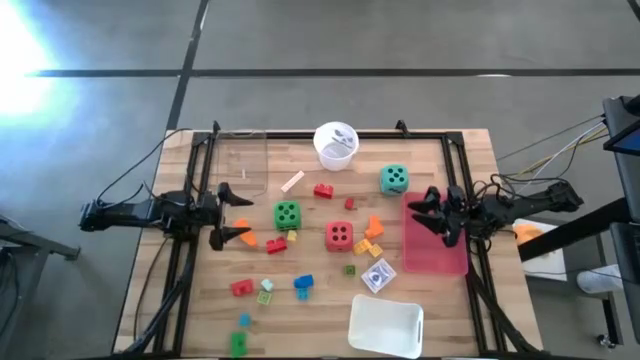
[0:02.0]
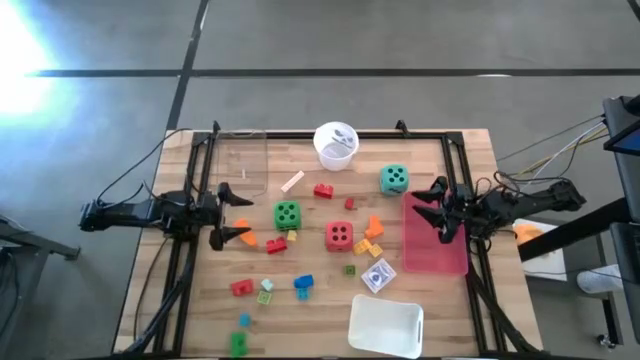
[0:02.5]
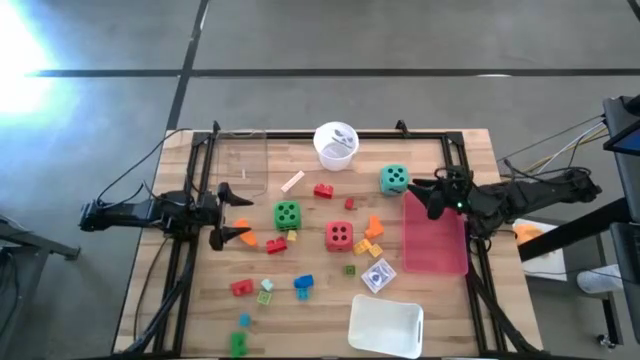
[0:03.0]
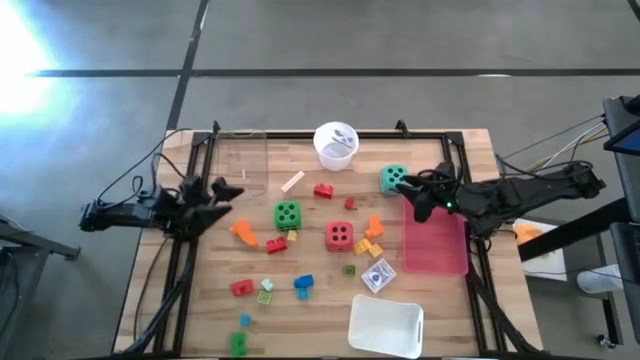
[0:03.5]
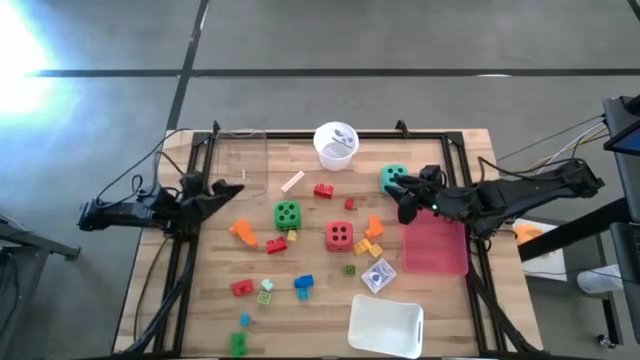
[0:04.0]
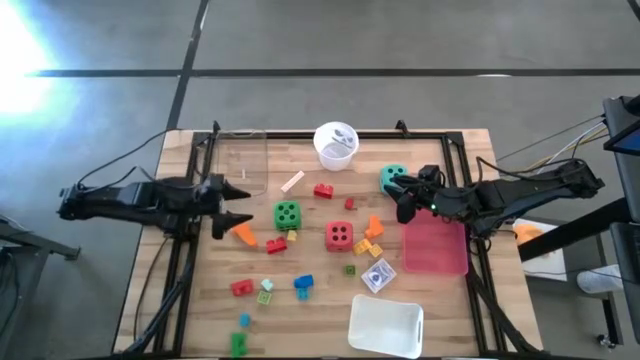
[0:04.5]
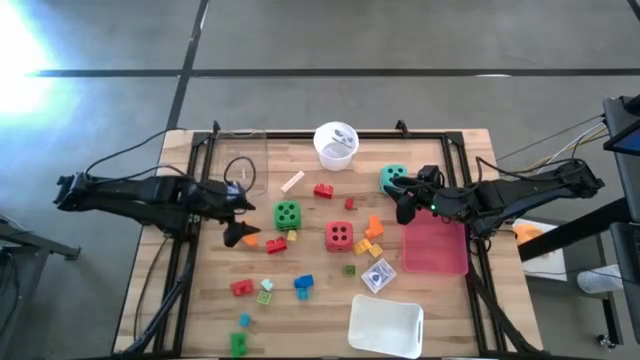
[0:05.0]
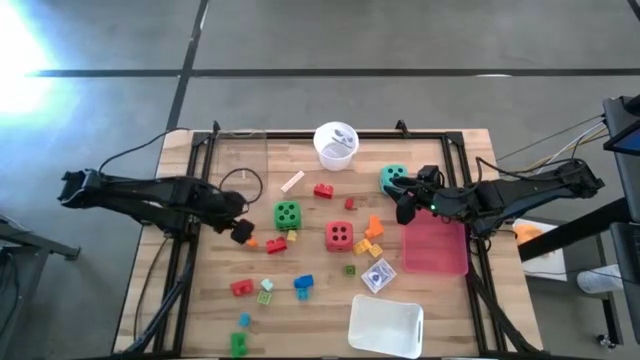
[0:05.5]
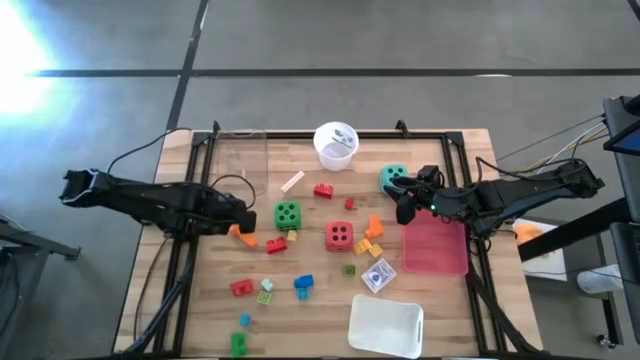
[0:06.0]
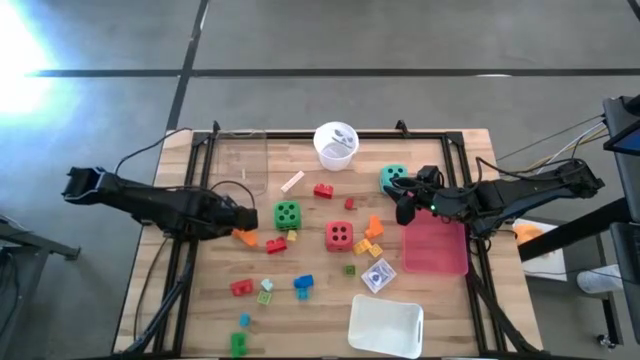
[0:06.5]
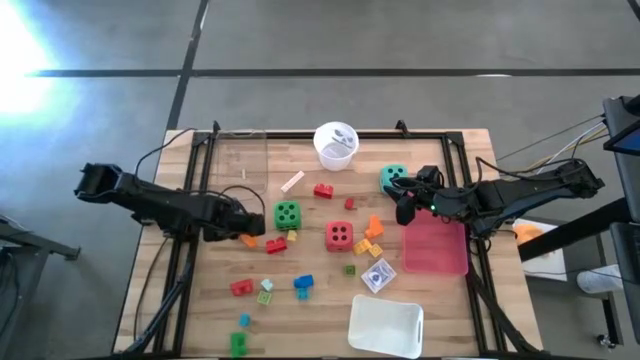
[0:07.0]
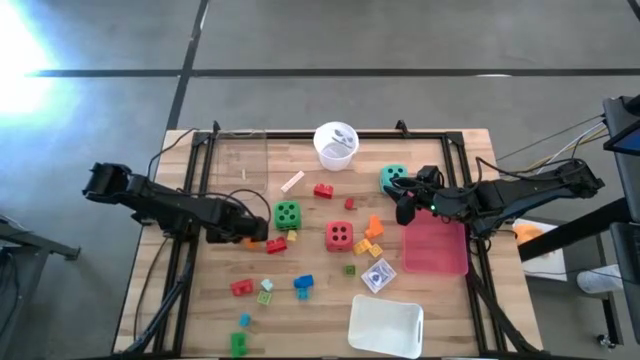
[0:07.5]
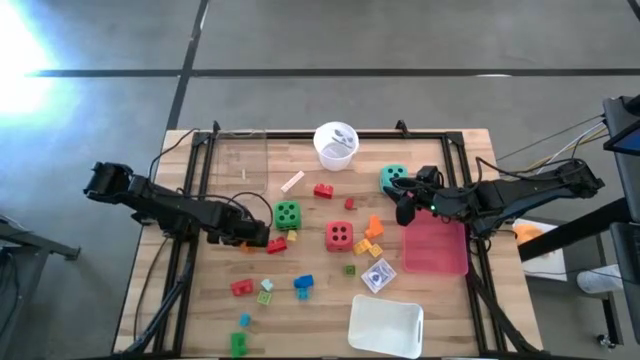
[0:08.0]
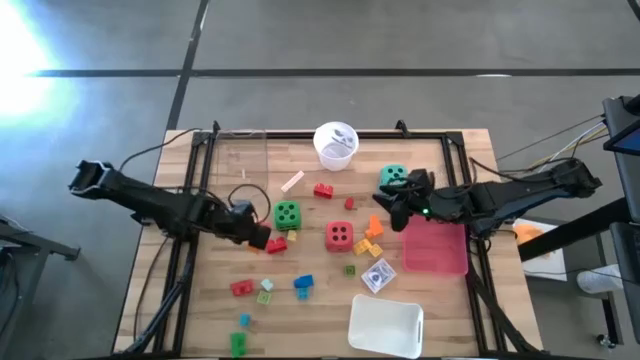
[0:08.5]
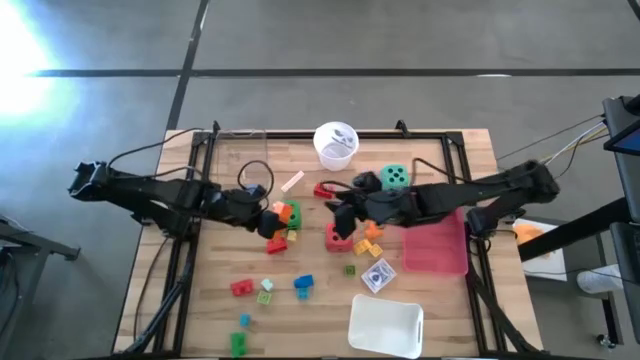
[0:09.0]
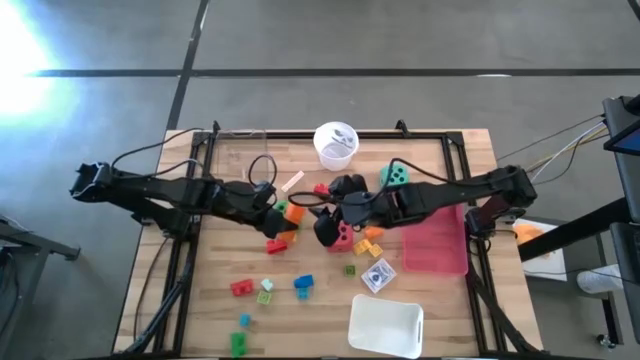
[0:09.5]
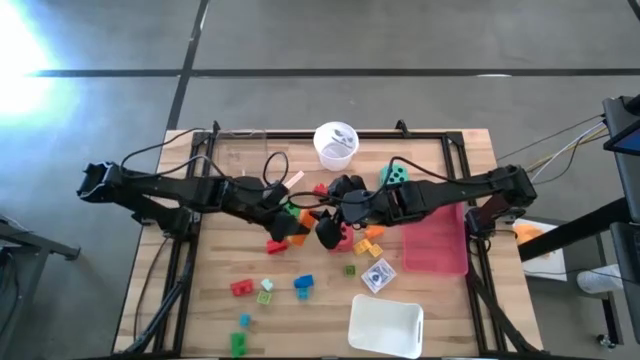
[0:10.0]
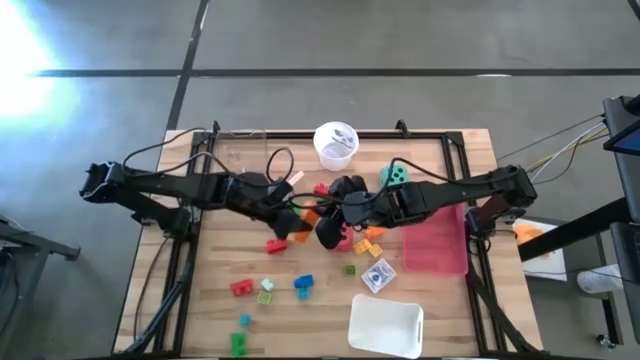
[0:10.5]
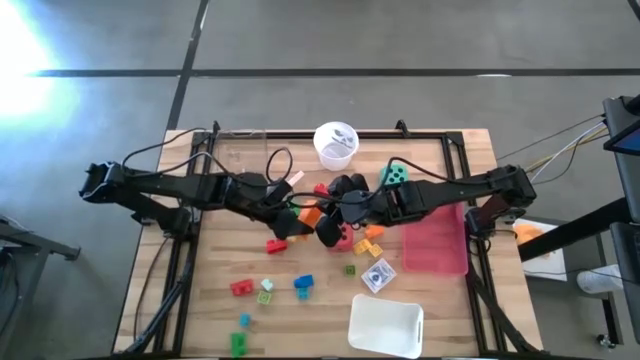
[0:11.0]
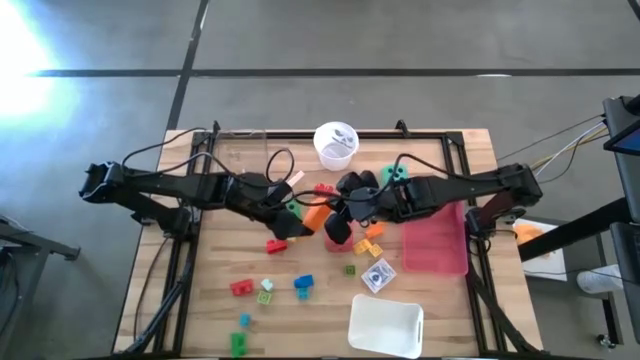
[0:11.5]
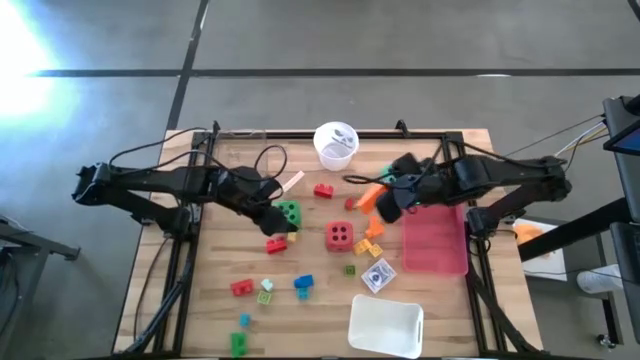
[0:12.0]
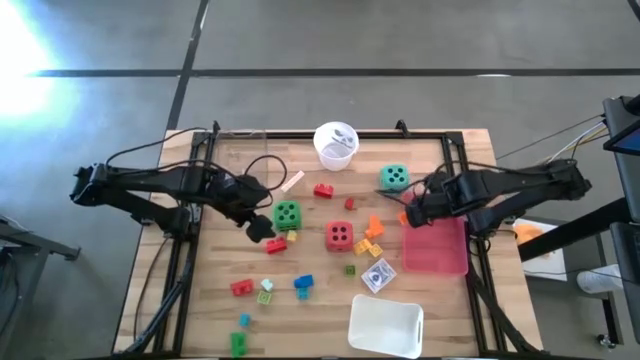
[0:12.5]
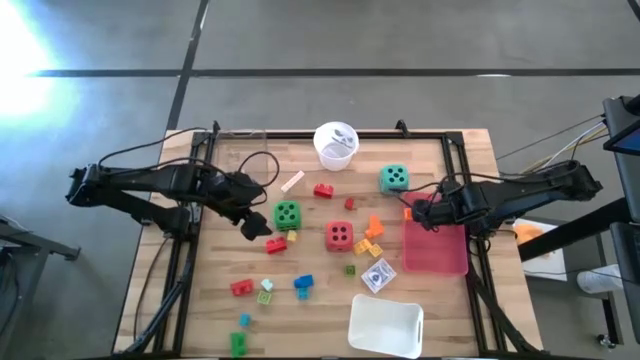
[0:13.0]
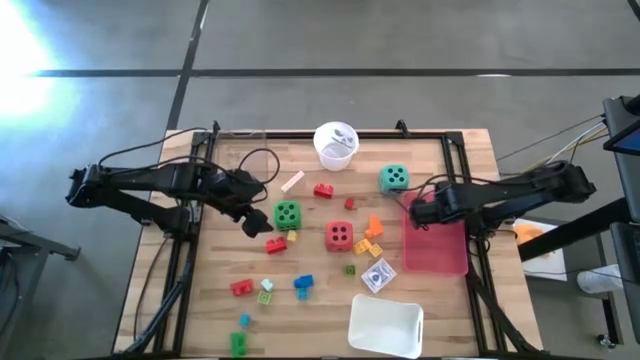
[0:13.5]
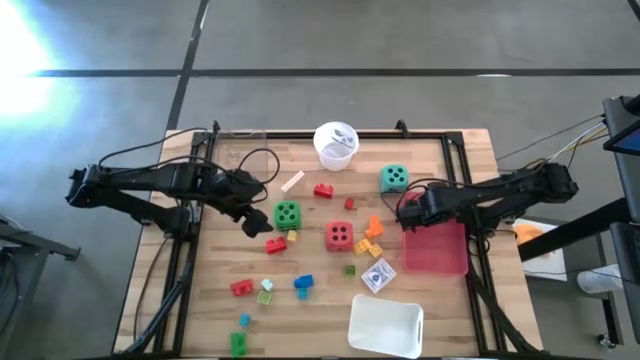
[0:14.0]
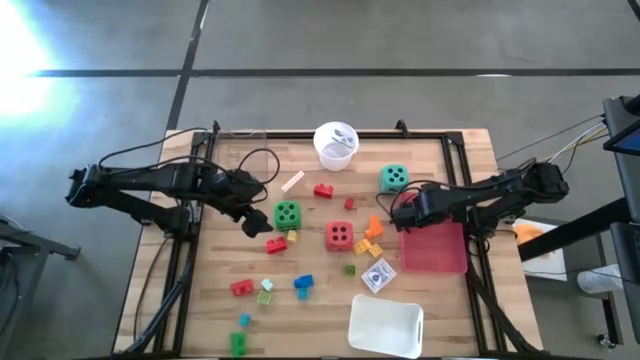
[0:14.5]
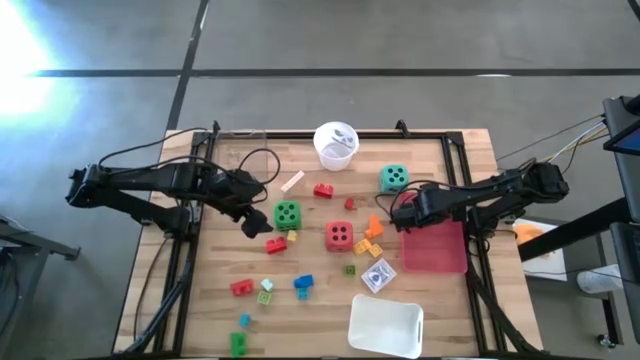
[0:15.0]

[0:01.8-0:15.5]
Task: Pick & Place Toys
Put the orange game piece into the pink bin

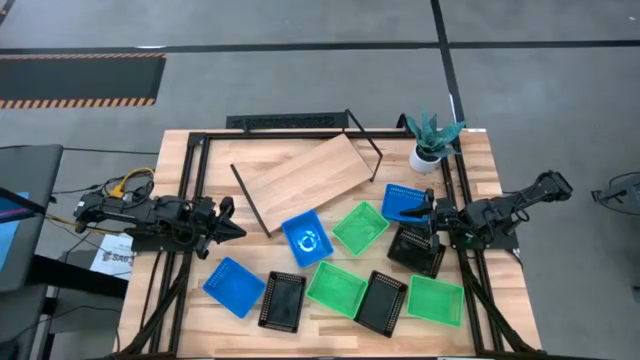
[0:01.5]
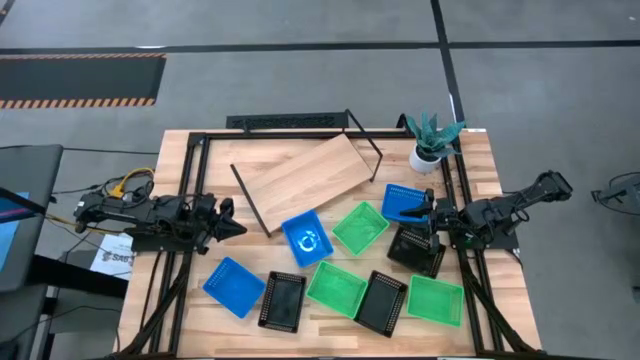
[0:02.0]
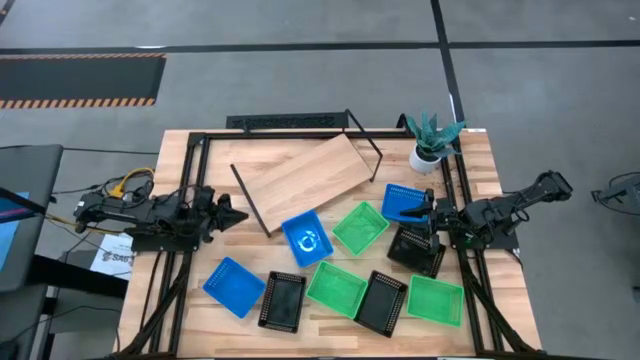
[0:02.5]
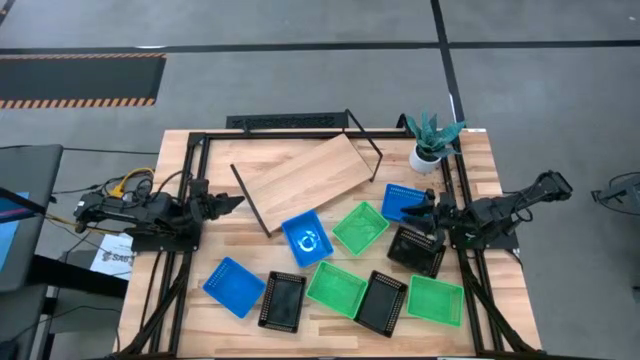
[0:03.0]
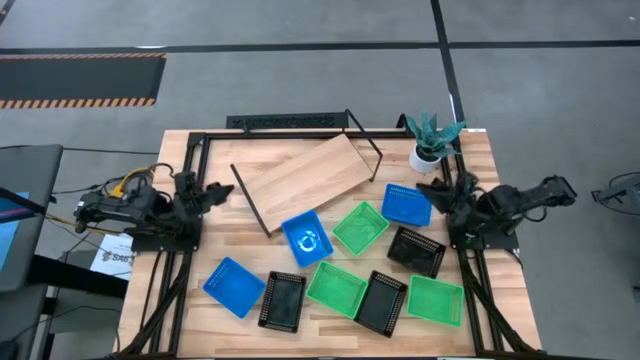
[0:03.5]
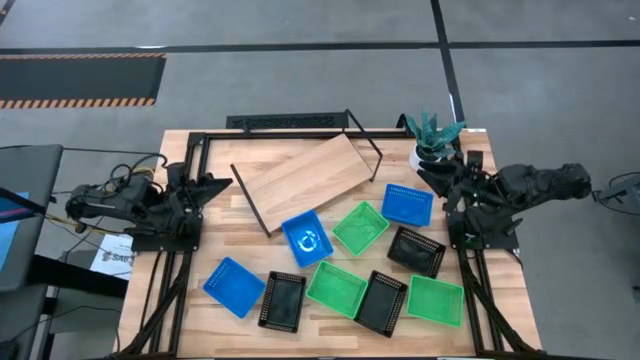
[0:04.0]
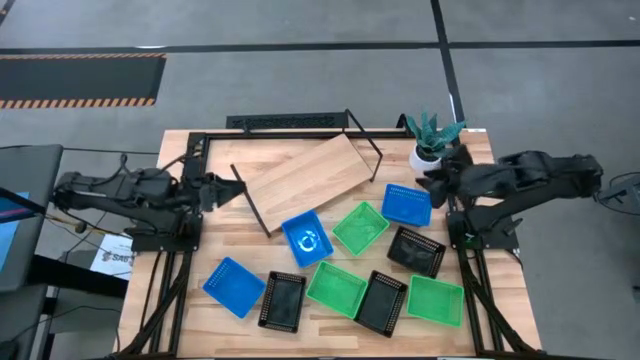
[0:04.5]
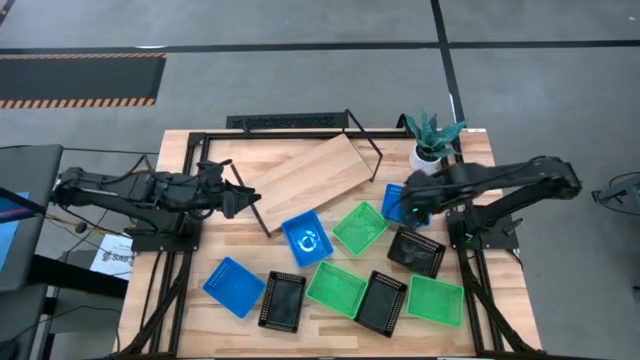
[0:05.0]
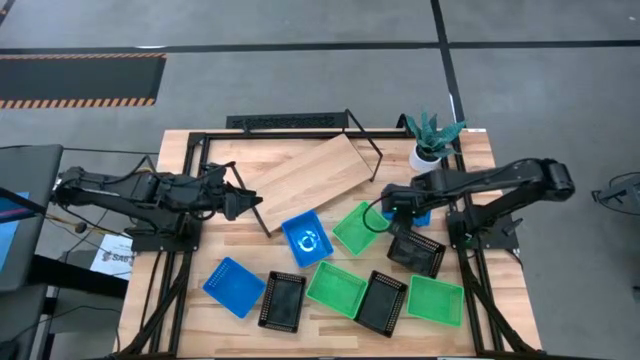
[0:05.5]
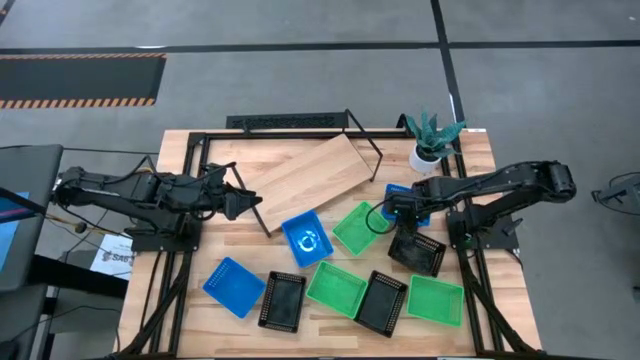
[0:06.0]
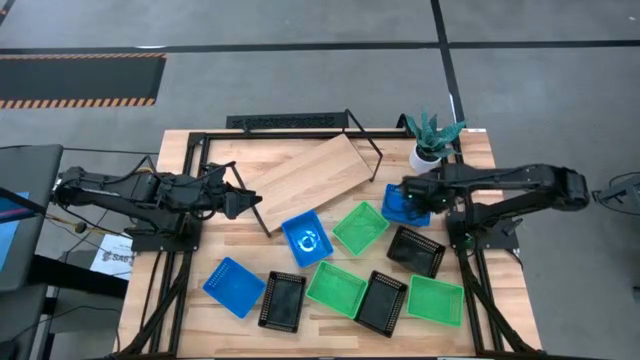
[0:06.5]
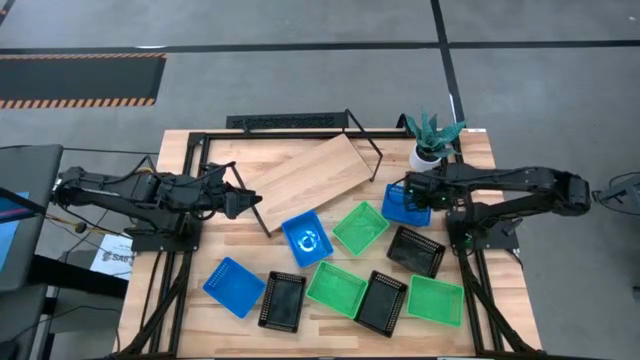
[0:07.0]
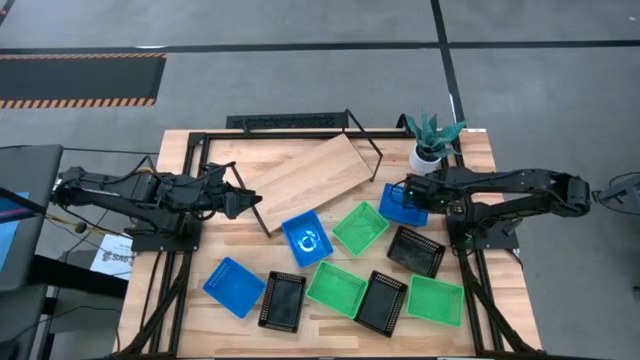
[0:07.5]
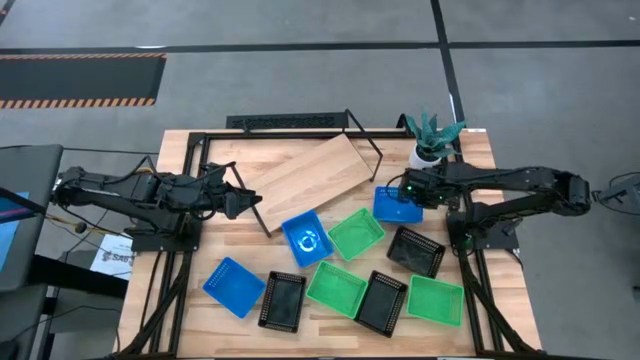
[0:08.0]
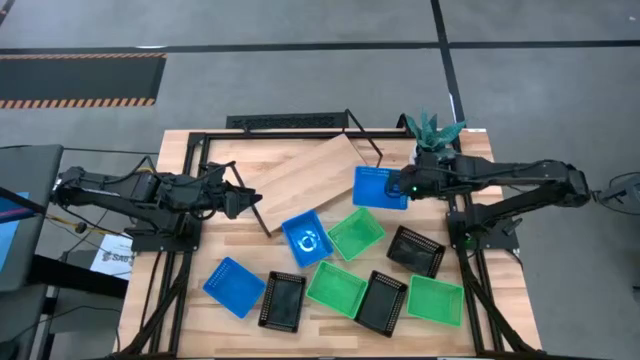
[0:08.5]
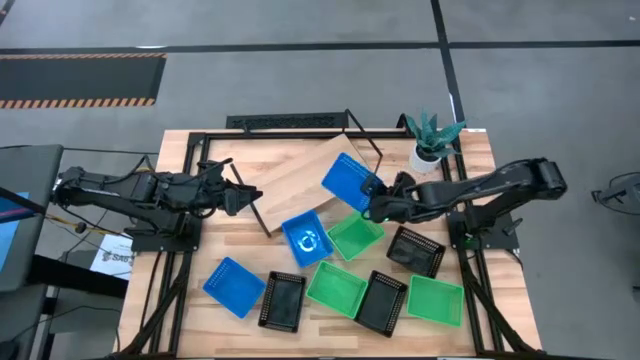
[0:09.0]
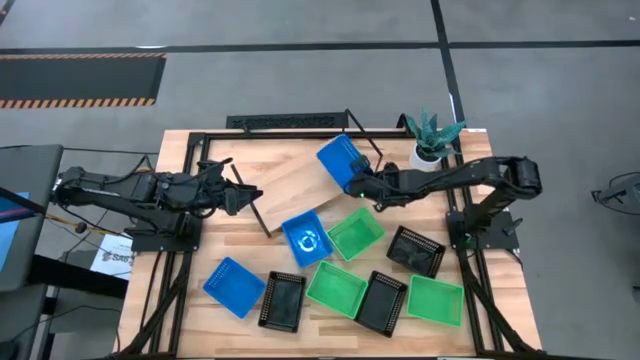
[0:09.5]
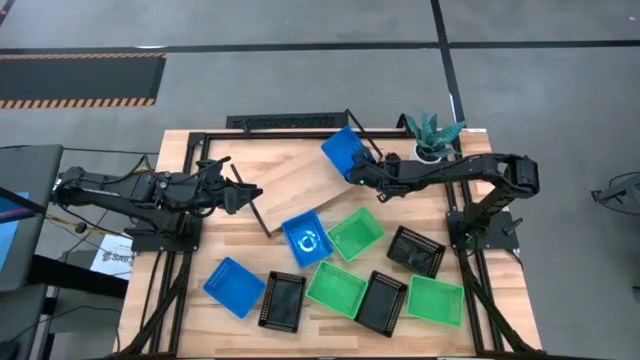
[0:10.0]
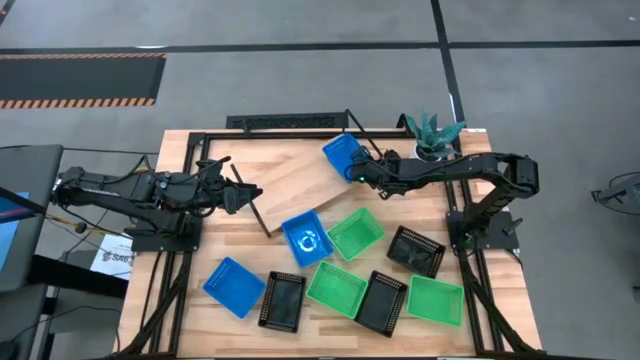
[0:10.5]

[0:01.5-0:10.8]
Task: Stack baskets on shelf by color
Put the top blue bin on the shelf
